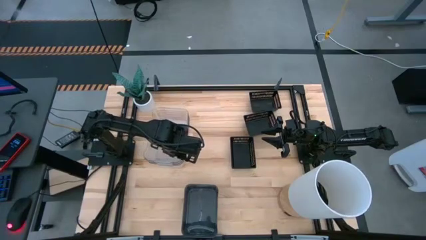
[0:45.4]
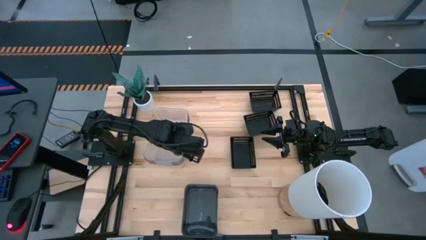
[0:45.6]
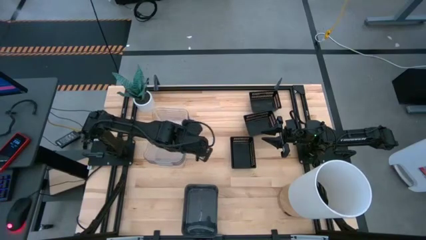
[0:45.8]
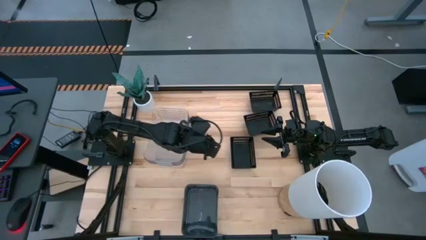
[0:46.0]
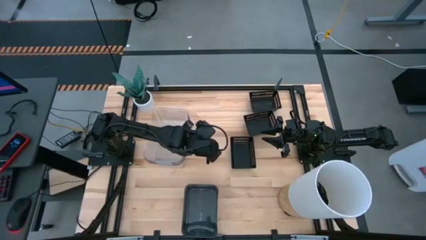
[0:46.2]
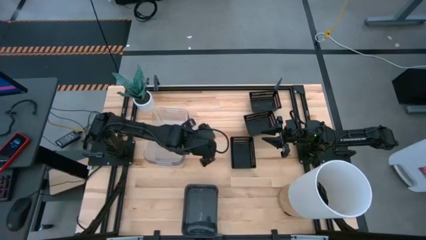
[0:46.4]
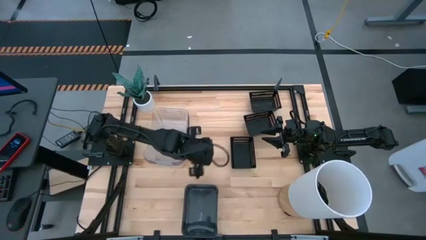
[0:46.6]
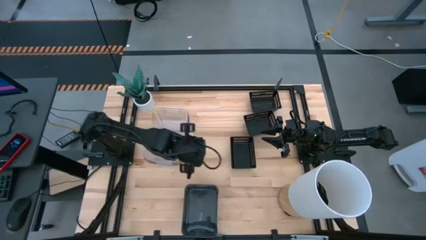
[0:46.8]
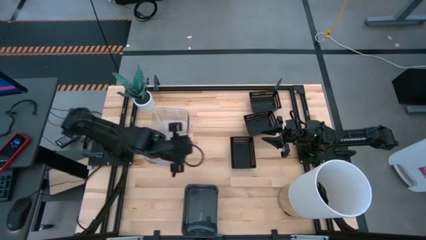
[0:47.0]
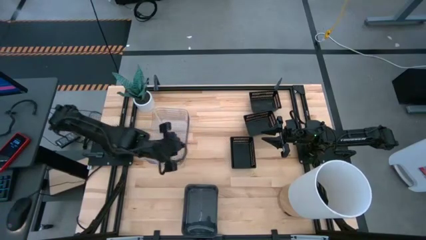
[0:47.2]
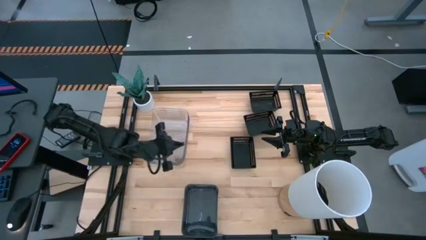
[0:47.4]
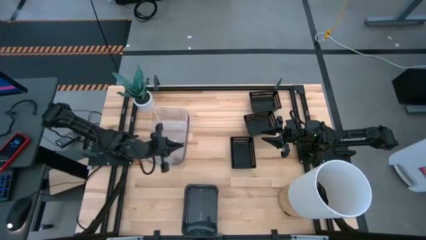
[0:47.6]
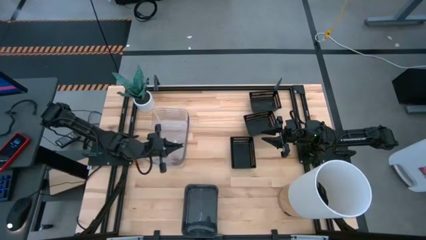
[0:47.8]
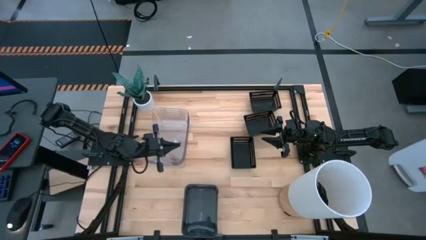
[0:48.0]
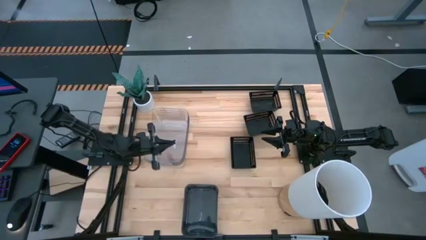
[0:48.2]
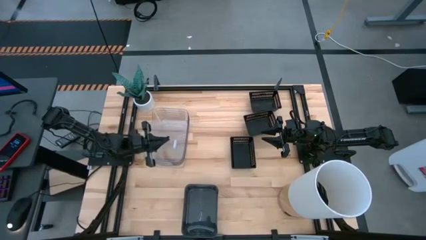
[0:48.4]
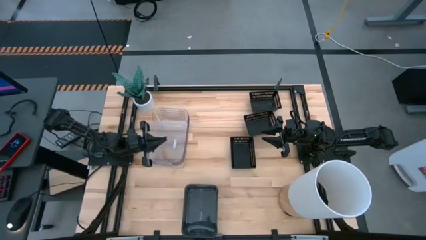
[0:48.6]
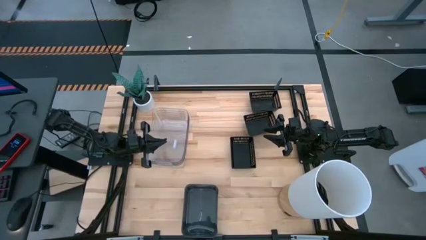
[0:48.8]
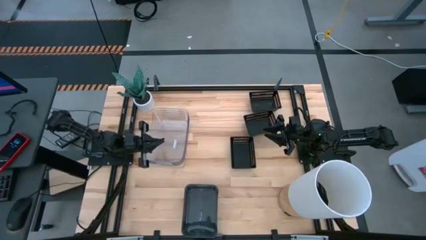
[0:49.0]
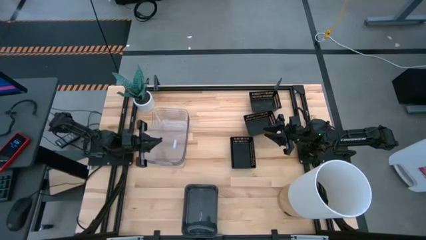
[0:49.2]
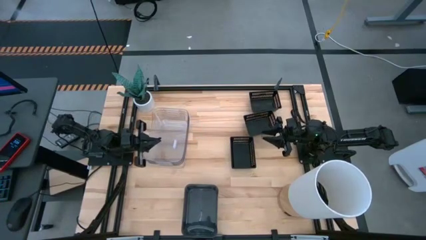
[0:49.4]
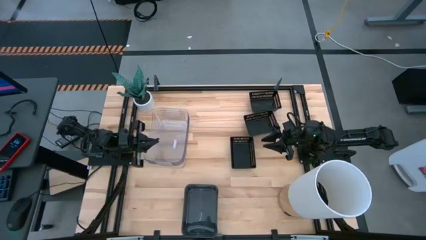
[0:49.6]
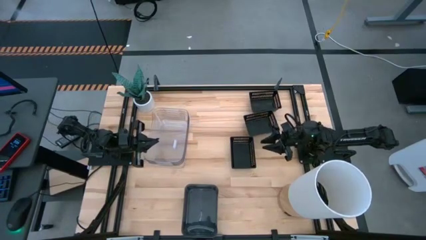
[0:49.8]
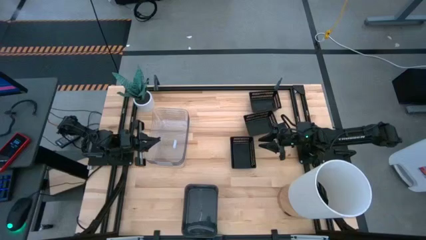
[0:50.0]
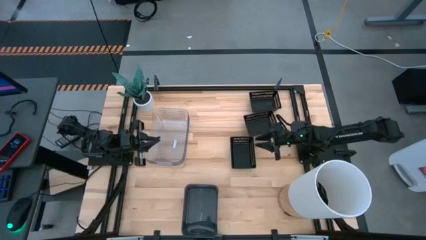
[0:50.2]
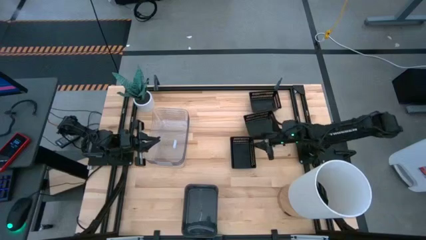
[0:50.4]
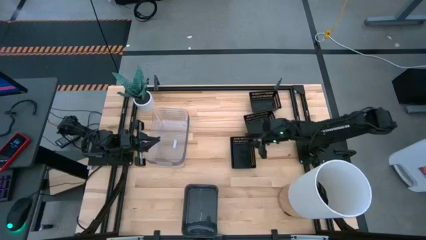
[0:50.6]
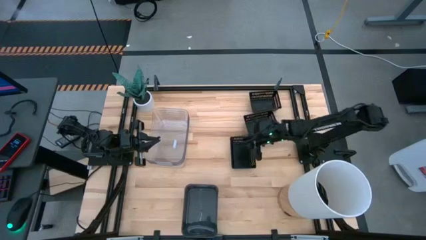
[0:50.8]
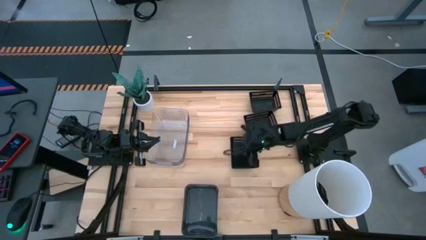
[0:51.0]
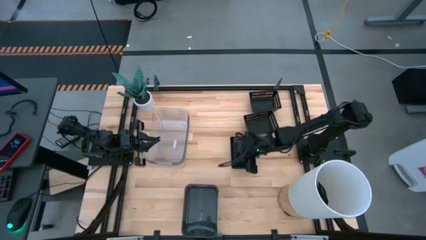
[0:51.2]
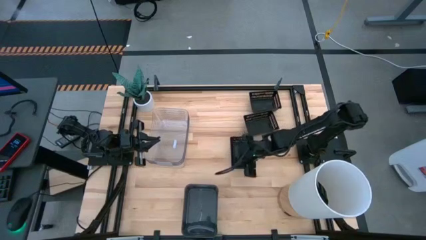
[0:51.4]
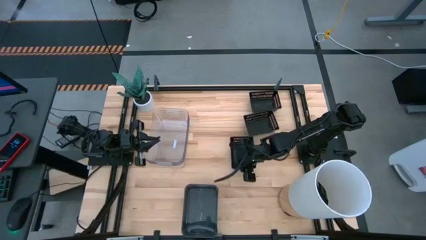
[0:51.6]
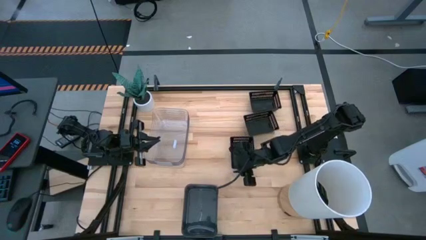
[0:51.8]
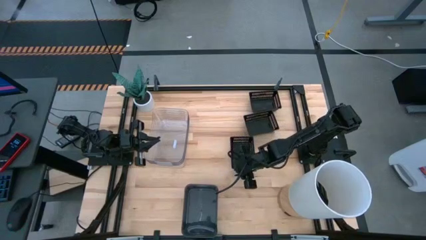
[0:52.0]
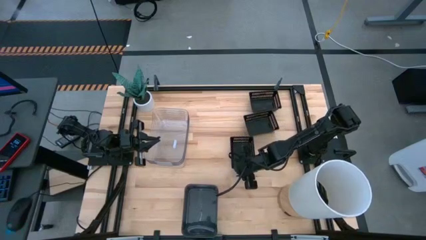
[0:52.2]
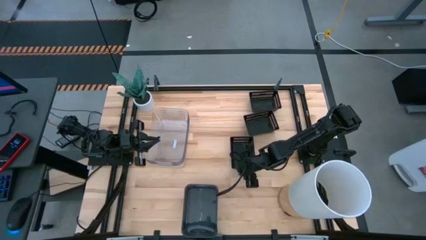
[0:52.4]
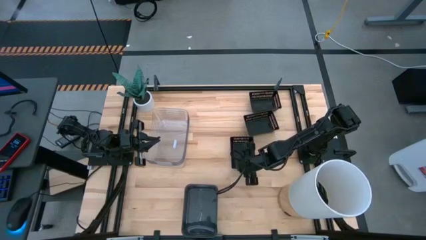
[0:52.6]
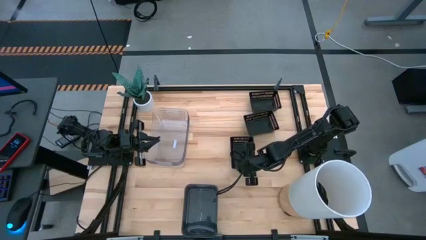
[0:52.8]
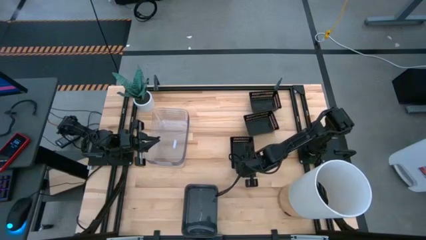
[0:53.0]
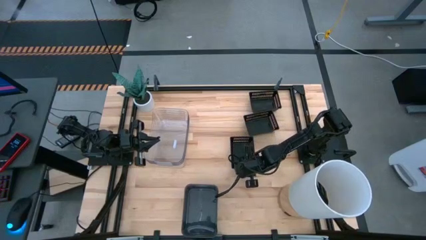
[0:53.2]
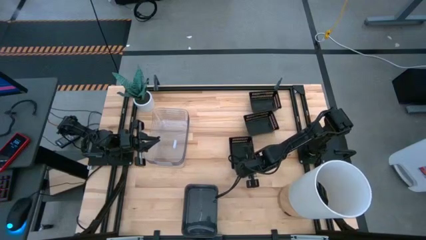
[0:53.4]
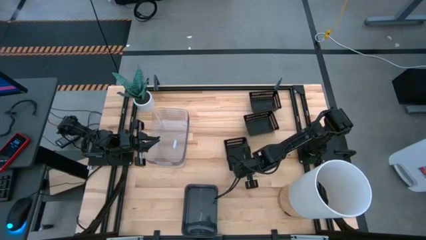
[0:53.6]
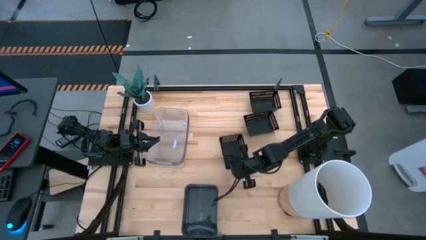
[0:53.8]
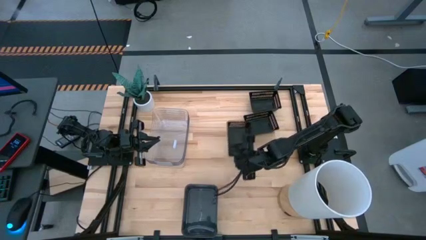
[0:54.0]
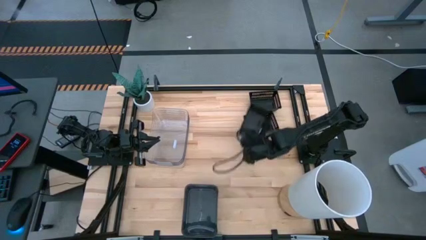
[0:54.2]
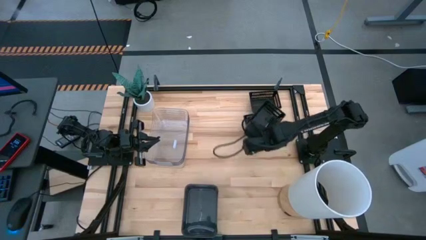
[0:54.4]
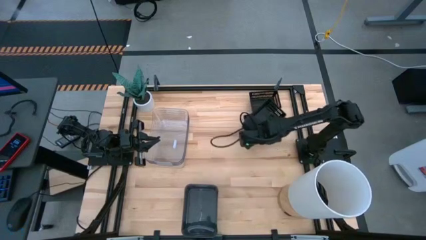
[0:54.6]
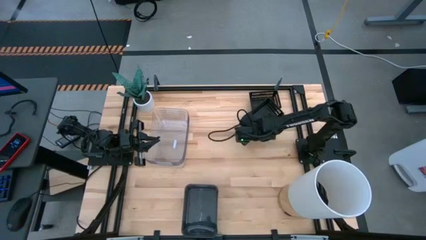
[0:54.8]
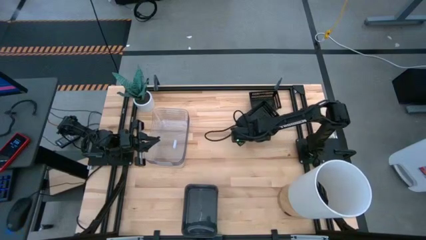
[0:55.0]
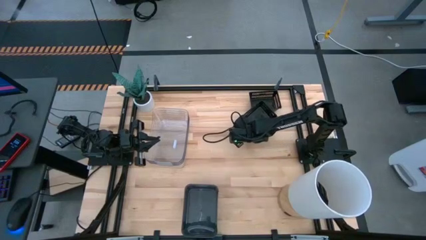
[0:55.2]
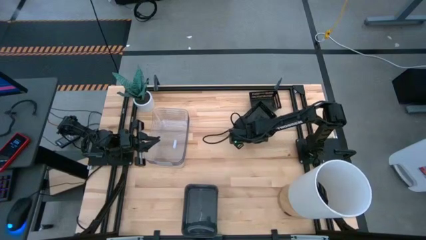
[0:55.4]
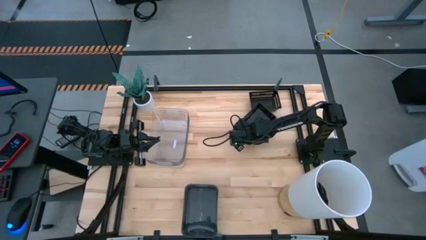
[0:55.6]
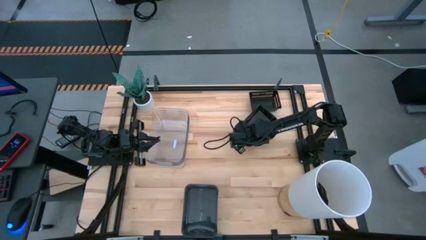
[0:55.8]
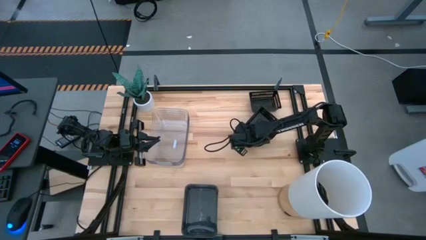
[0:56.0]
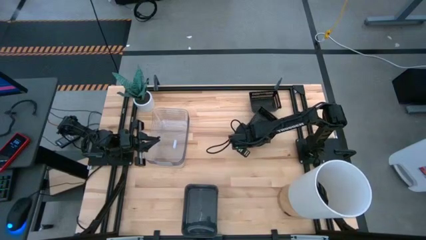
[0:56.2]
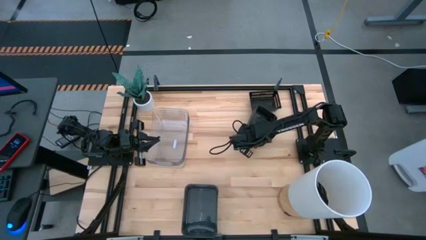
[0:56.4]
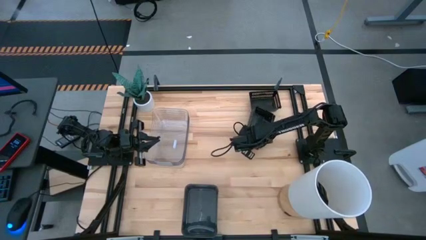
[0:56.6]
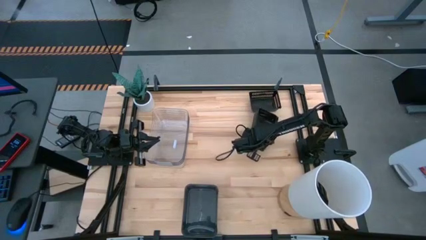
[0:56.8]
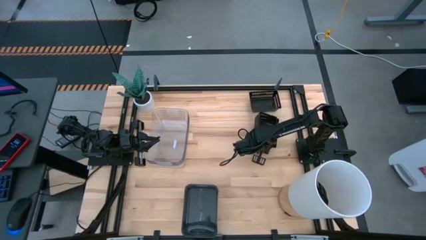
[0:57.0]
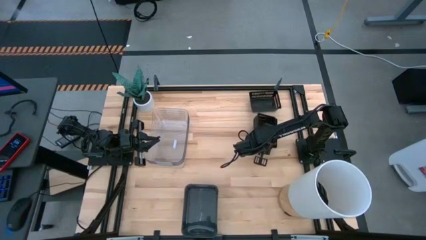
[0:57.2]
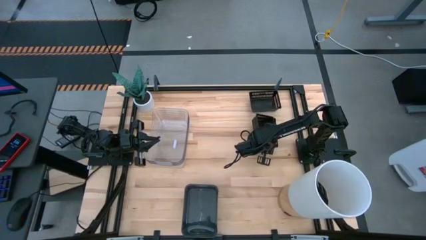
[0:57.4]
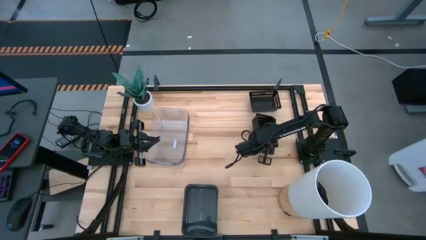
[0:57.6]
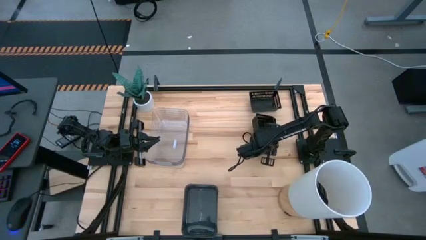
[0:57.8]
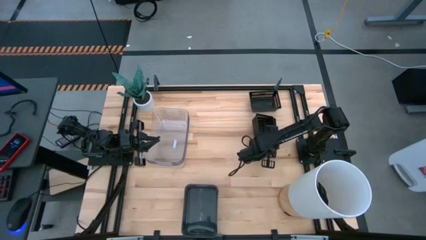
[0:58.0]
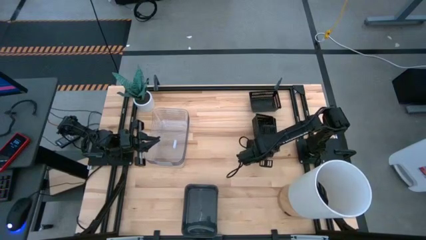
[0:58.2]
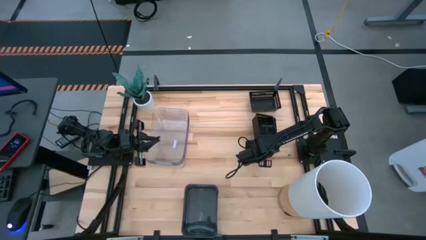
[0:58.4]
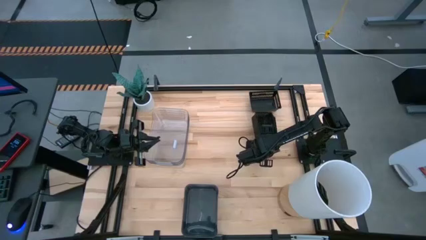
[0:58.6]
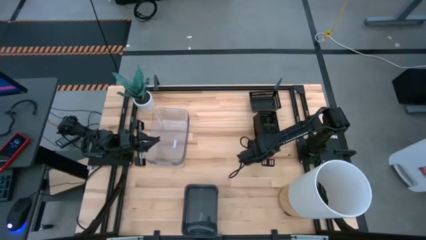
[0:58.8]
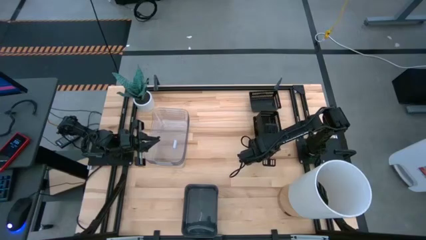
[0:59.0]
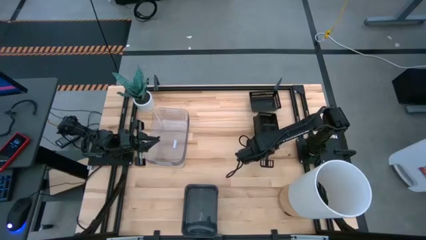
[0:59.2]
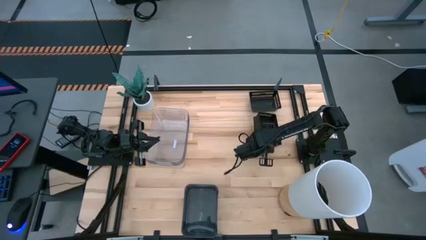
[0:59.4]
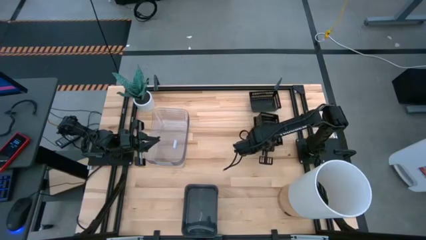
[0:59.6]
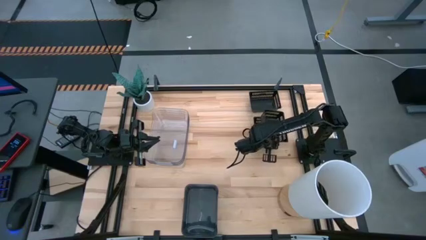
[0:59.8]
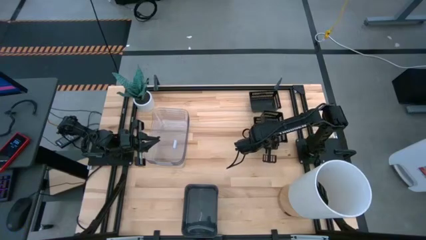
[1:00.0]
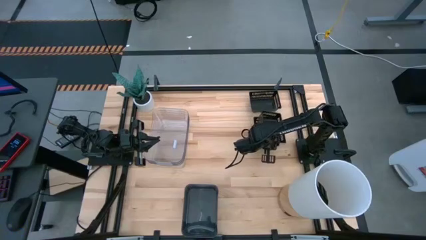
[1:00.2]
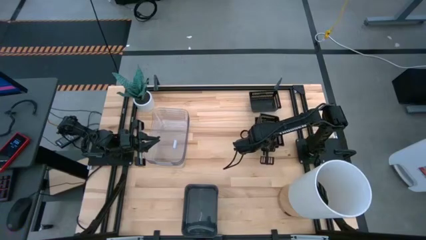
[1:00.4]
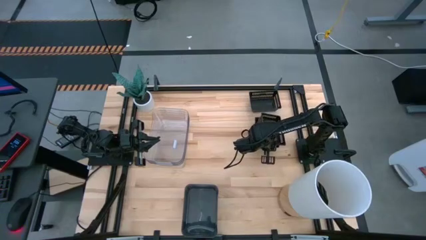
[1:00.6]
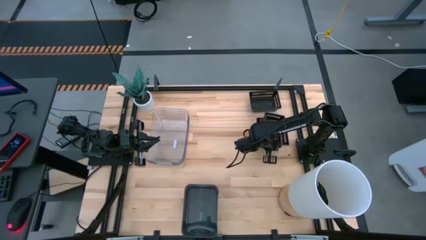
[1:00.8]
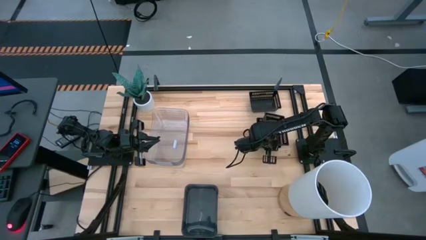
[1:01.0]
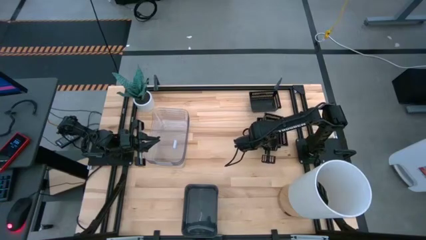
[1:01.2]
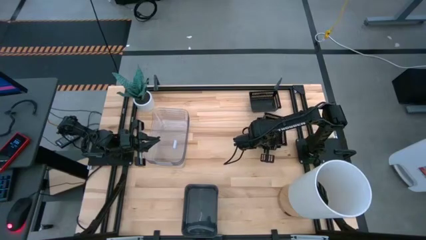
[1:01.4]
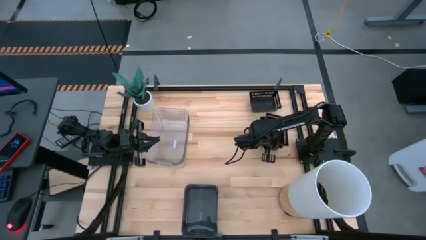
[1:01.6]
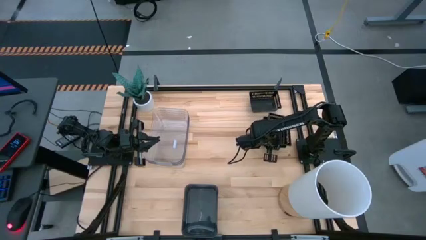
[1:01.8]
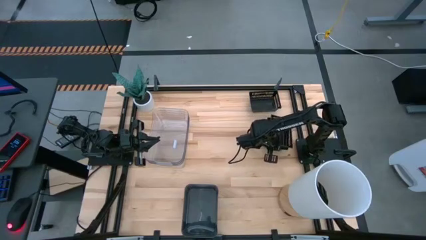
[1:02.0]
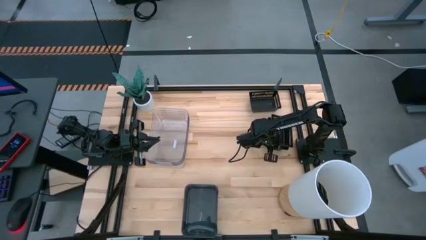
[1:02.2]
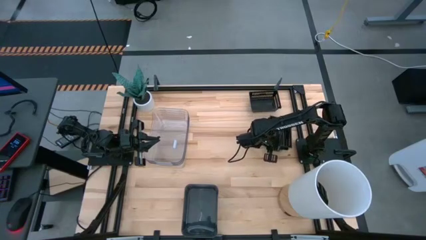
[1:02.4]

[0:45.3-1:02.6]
Stack the bottom black bin on top of the middle black bin

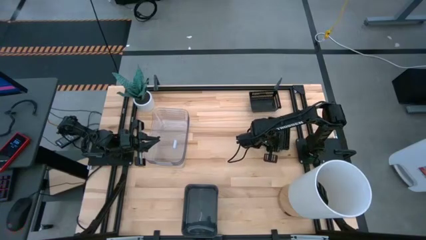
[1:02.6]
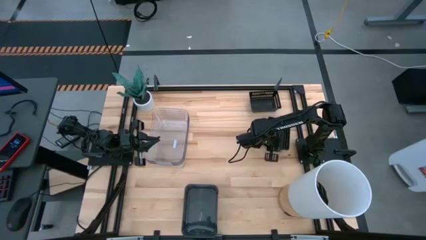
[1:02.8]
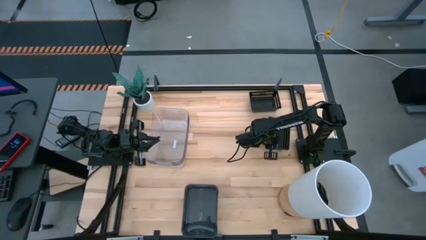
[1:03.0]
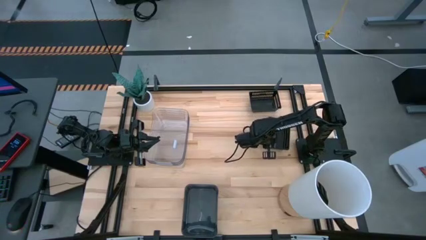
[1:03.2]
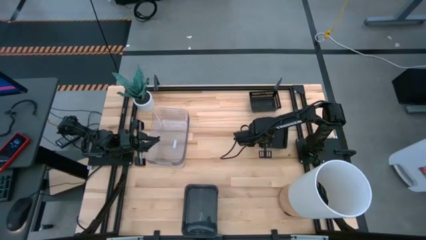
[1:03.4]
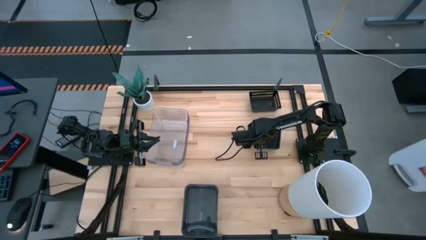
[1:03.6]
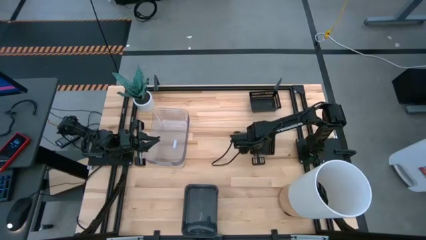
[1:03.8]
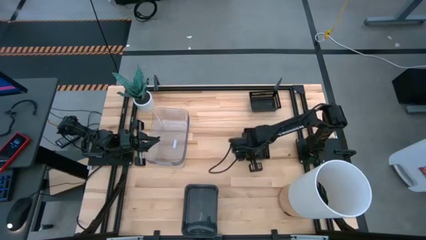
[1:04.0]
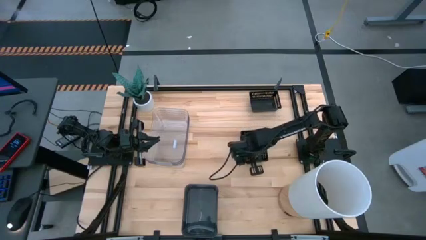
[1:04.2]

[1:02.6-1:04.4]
Move the stacked black bin to the light left on the table
